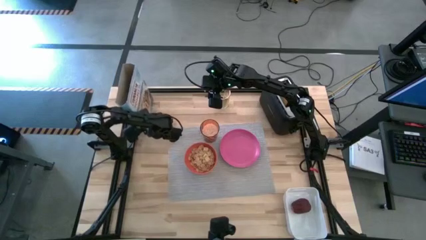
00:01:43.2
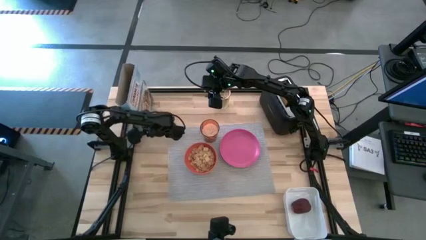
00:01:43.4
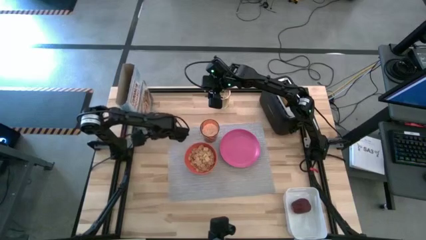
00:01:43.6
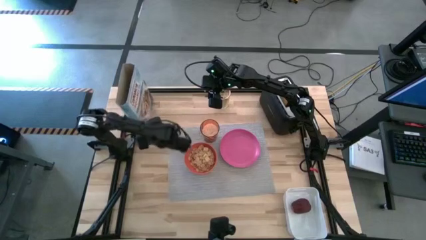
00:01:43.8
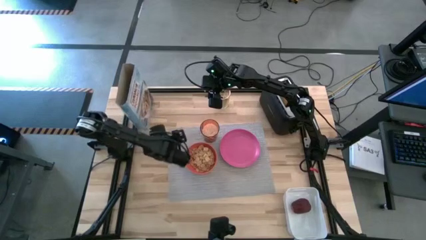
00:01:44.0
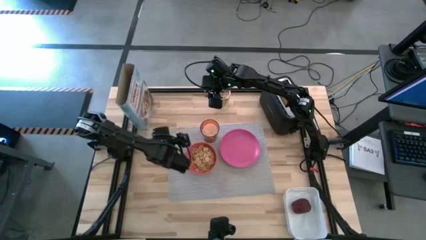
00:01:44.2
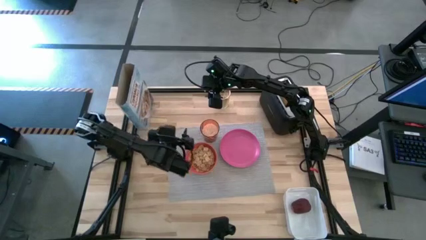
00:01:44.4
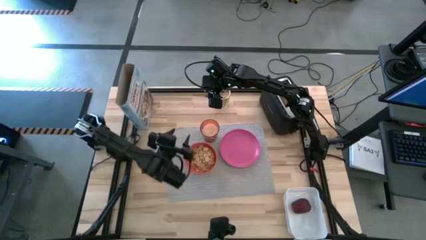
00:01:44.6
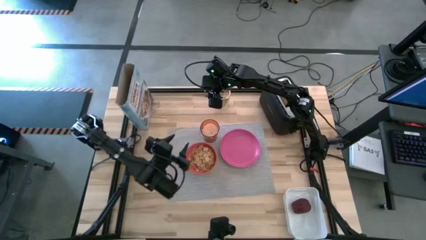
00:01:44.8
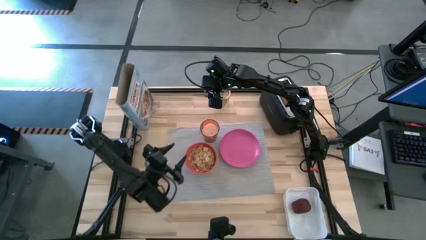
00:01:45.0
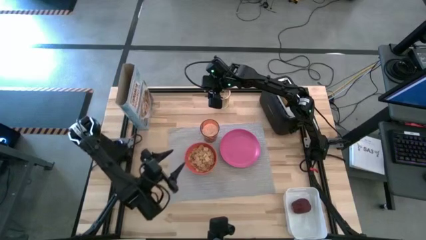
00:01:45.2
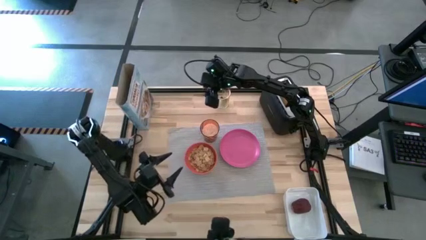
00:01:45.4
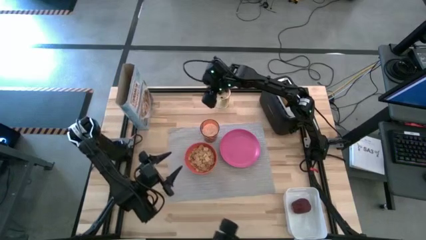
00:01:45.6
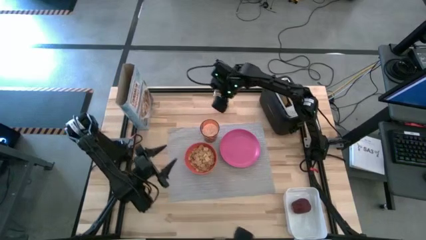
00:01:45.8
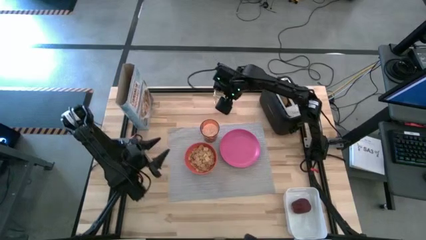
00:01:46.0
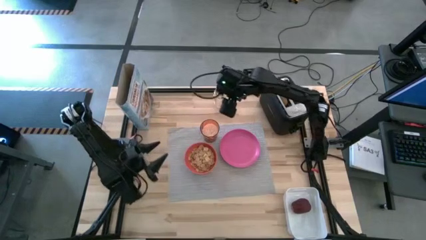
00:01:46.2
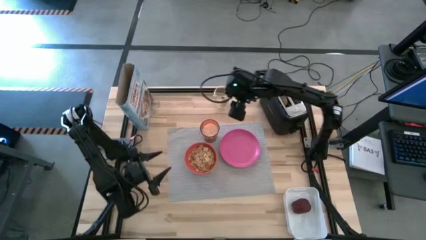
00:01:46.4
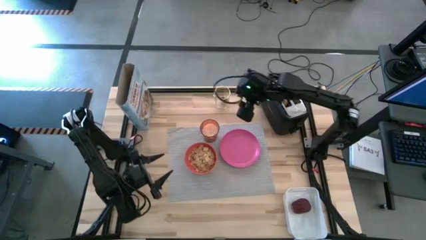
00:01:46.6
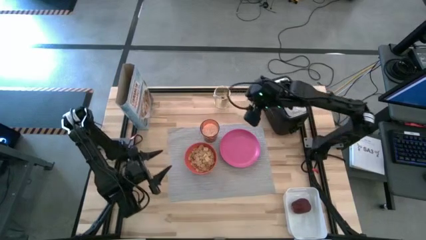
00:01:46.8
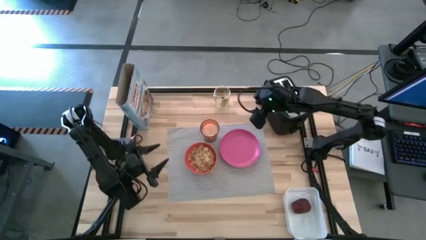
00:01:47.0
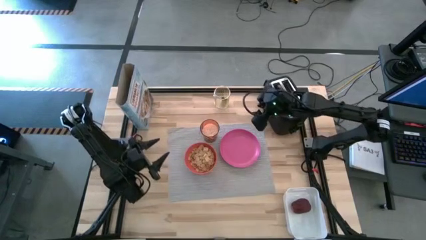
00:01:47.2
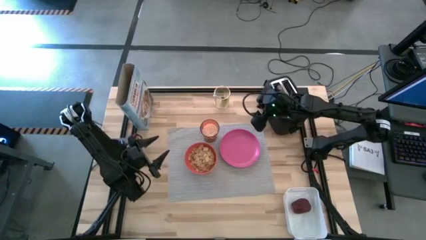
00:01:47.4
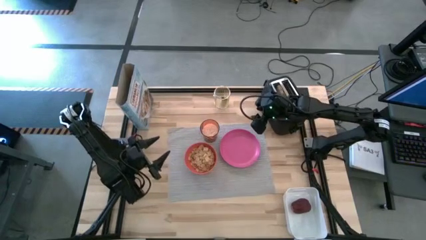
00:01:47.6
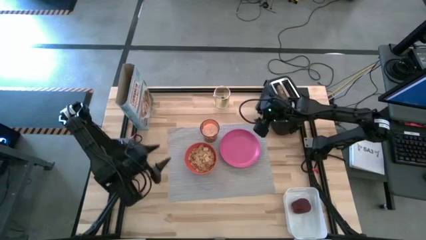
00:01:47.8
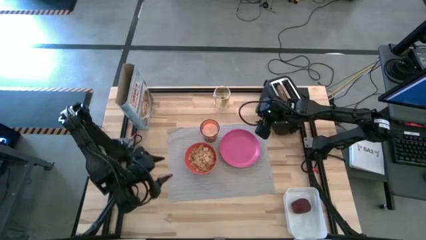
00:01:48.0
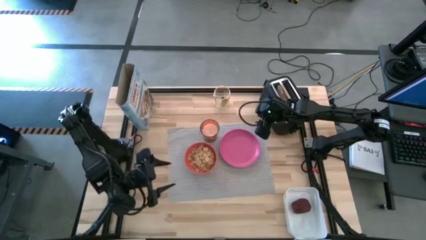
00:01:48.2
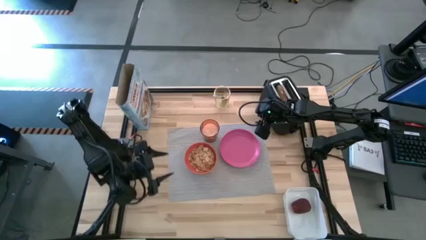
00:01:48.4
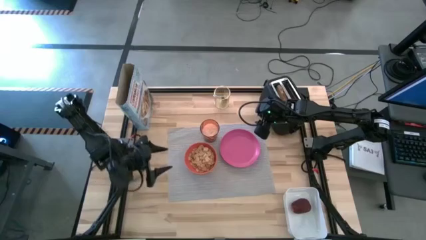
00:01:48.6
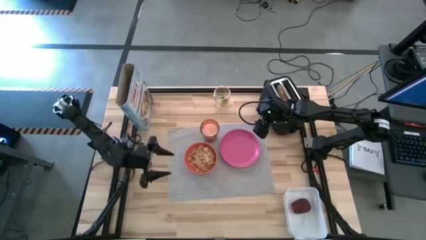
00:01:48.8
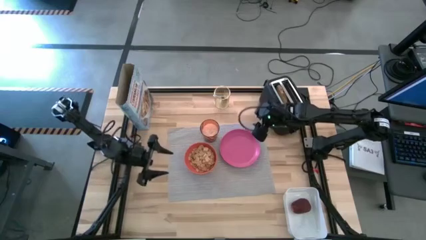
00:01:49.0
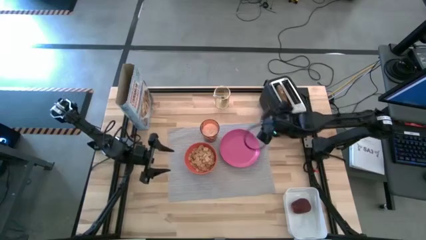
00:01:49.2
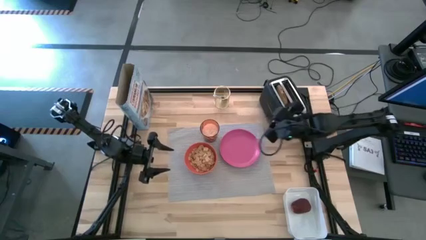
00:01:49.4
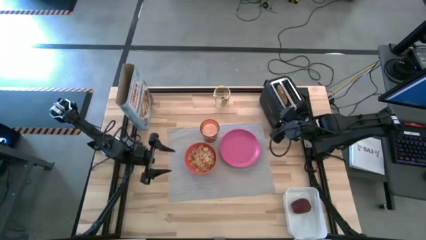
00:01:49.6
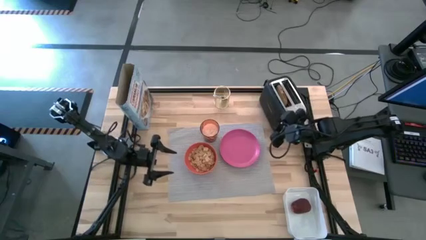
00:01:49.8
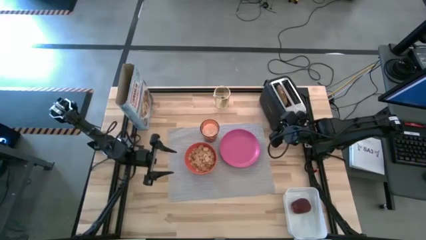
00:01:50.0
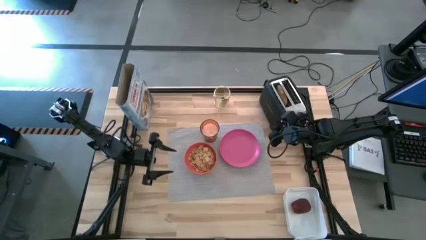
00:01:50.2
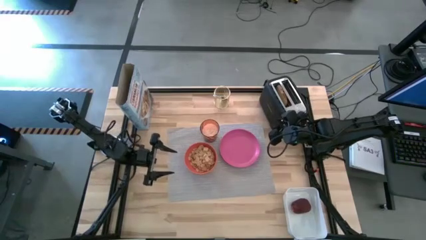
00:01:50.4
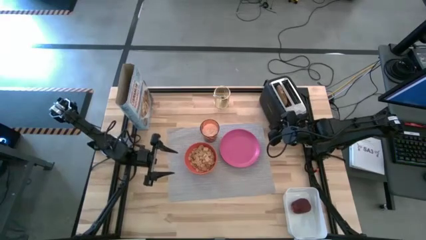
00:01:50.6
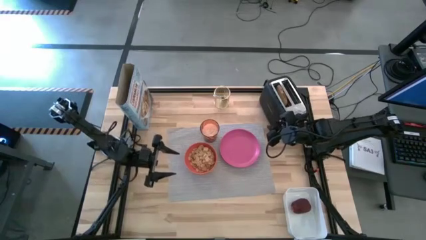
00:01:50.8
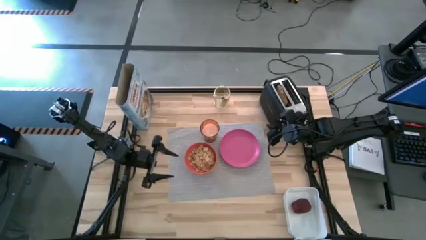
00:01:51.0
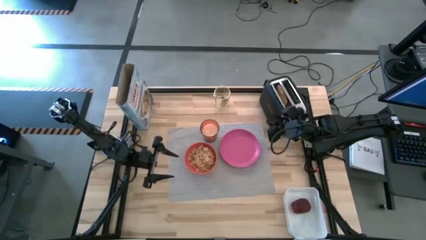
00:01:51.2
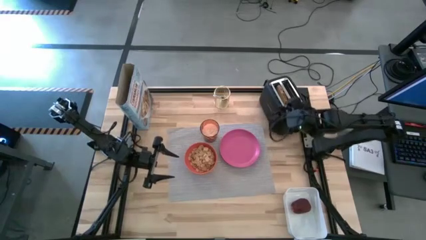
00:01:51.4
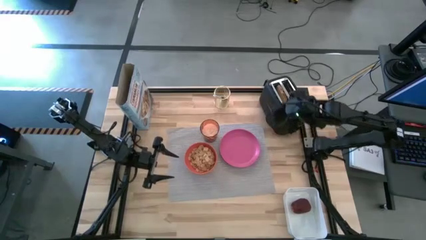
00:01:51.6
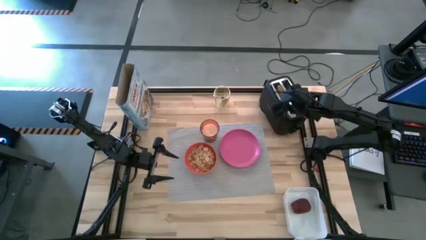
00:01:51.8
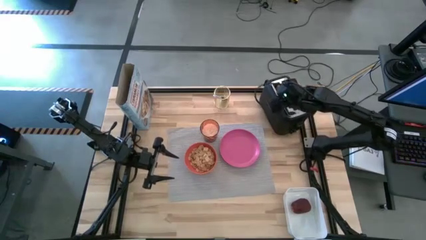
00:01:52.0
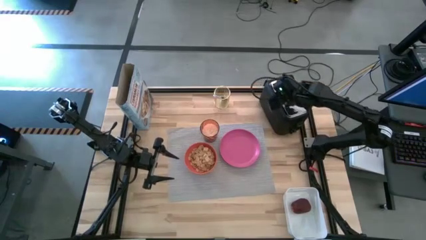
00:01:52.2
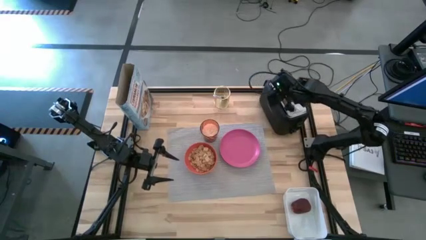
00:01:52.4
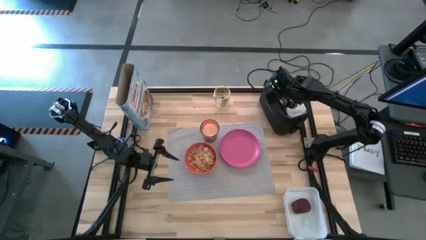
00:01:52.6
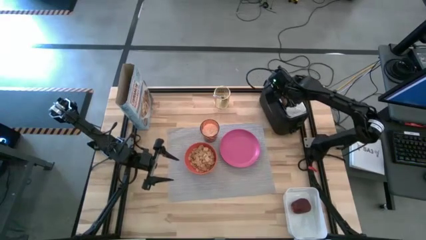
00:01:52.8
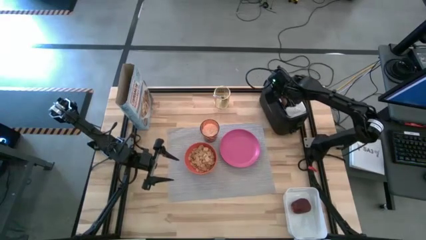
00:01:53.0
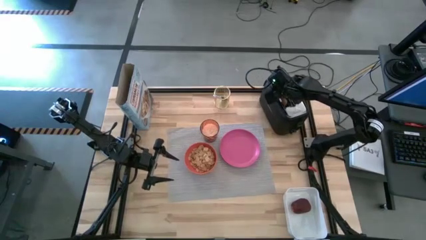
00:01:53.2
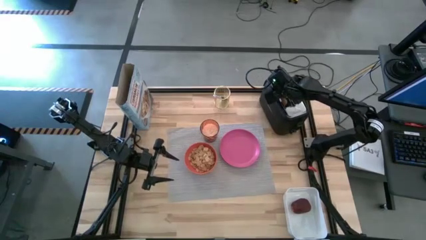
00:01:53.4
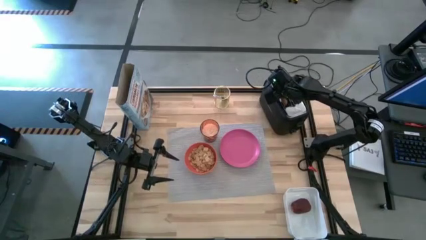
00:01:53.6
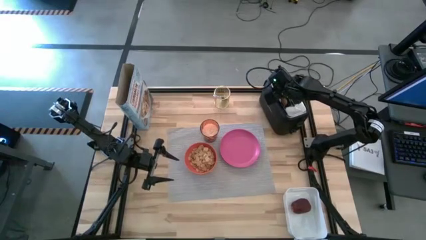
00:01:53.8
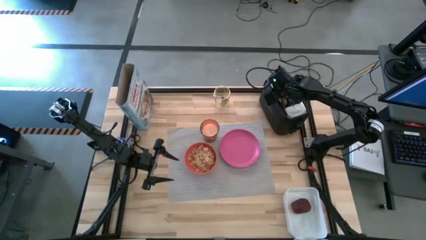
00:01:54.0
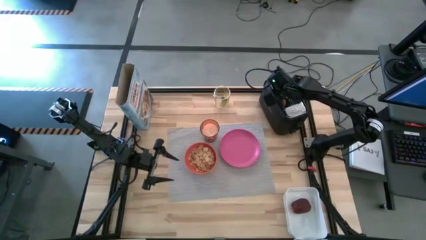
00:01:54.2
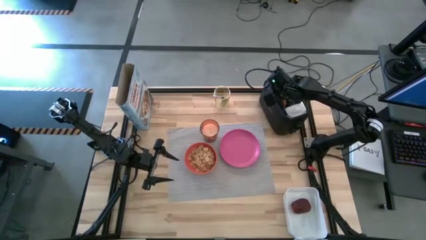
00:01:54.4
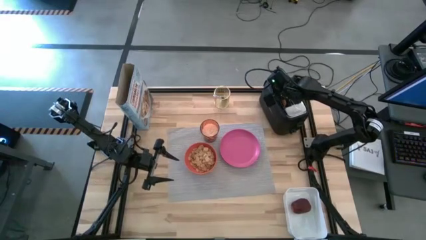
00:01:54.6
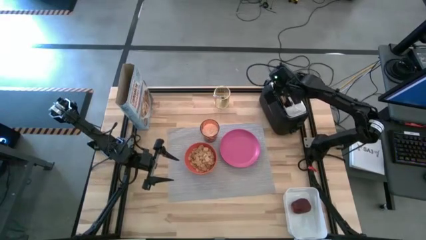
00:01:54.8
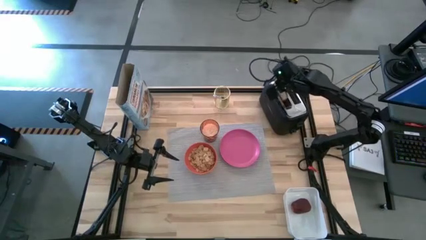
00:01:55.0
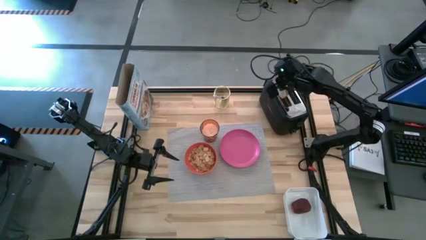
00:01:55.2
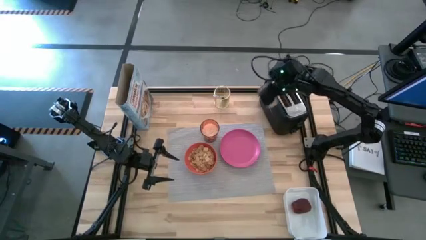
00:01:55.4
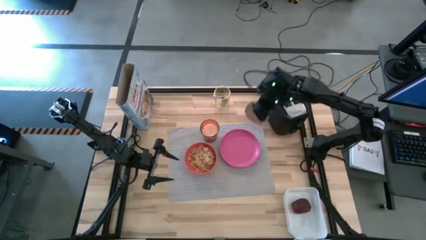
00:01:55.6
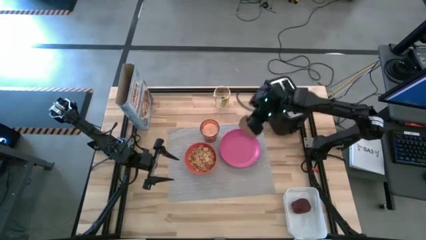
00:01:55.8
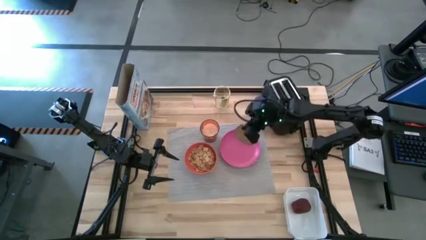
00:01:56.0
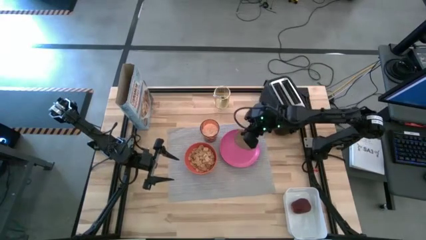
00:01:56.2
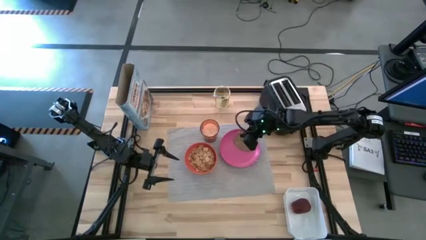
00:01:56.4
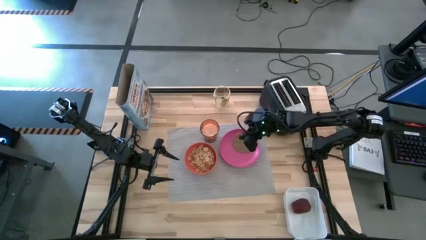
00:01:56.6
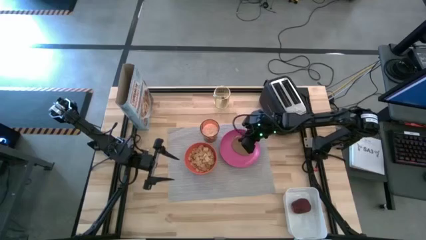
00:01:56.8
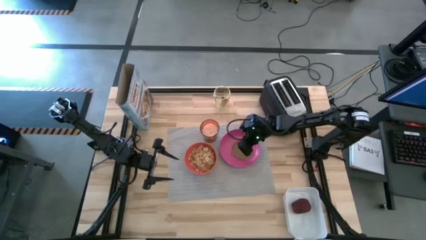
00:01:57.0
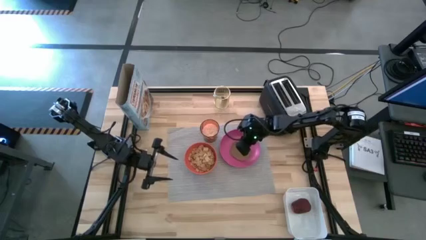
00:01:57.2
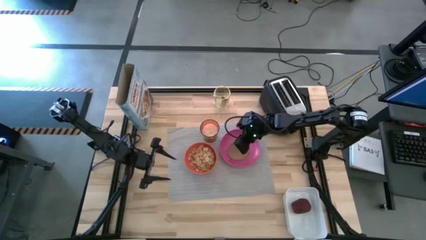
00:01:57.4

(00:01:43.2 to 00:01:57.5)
Task: Arrange a breakfast setting
Put the bagel on the pink plate
